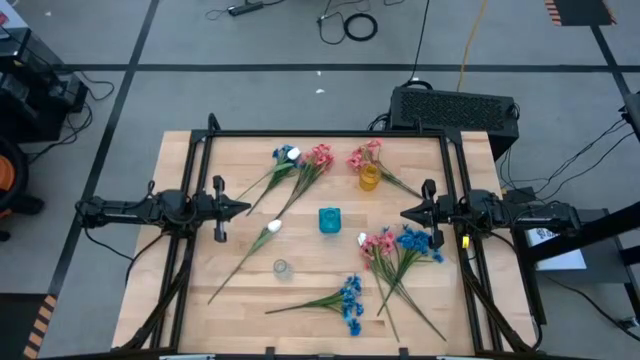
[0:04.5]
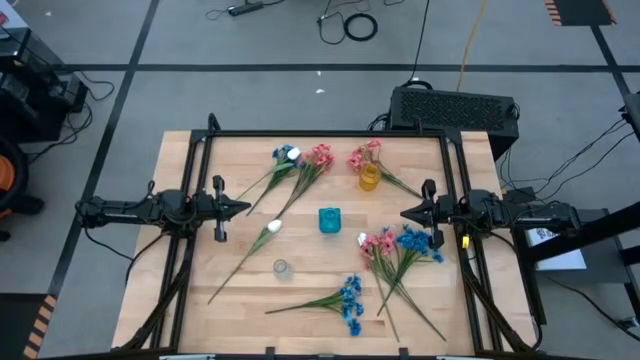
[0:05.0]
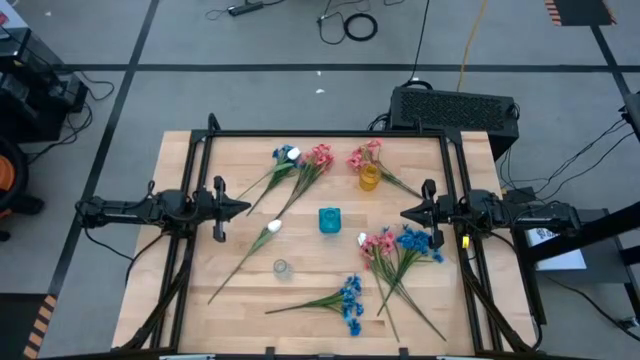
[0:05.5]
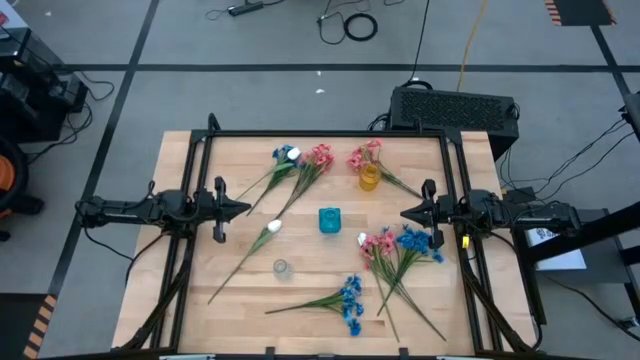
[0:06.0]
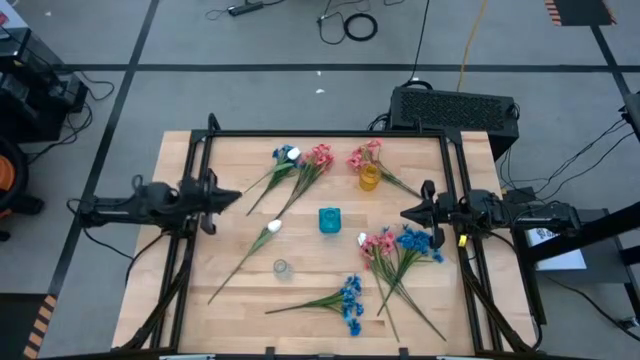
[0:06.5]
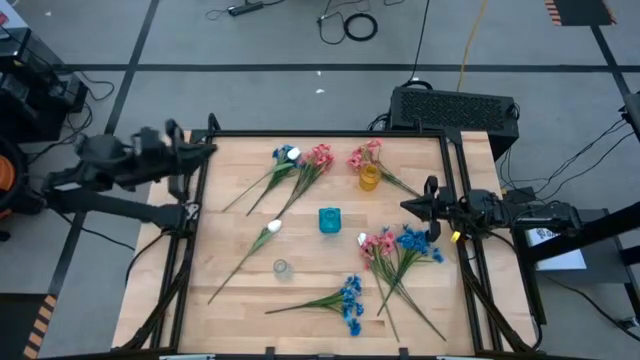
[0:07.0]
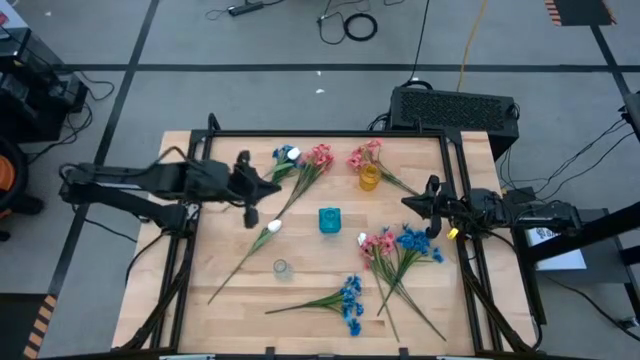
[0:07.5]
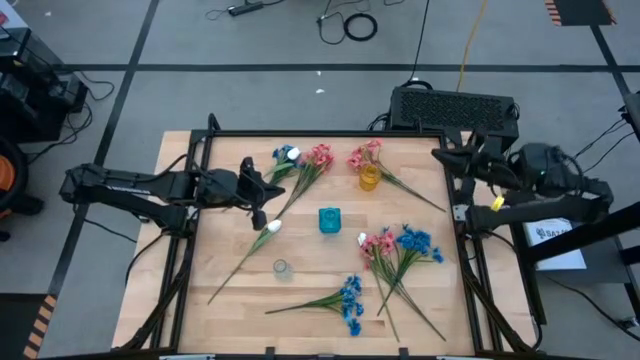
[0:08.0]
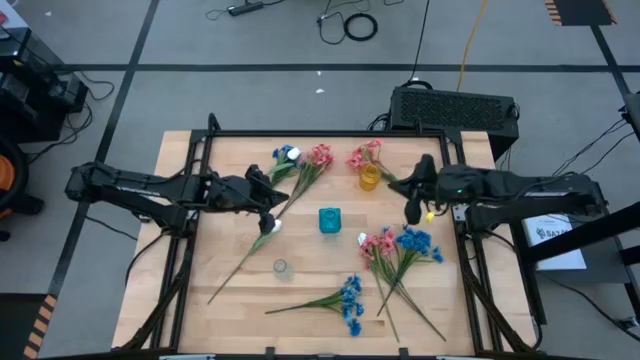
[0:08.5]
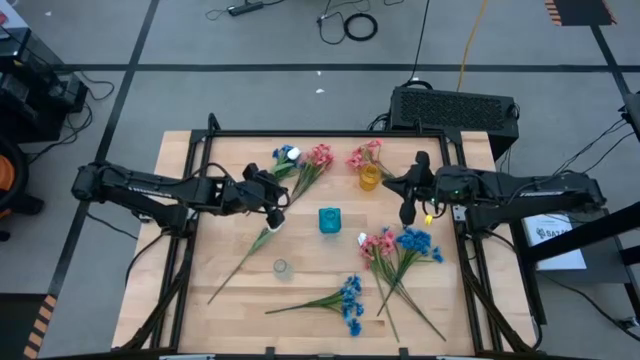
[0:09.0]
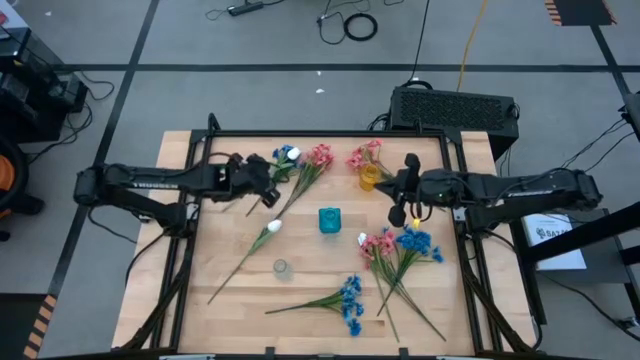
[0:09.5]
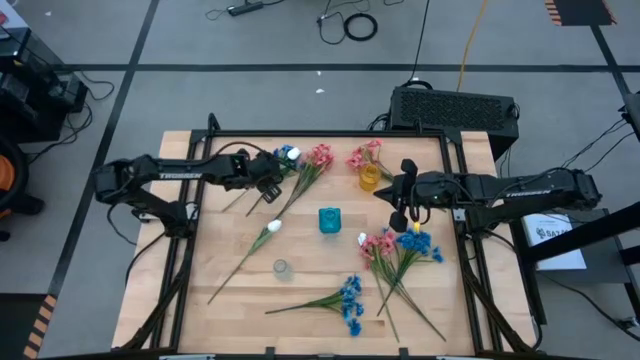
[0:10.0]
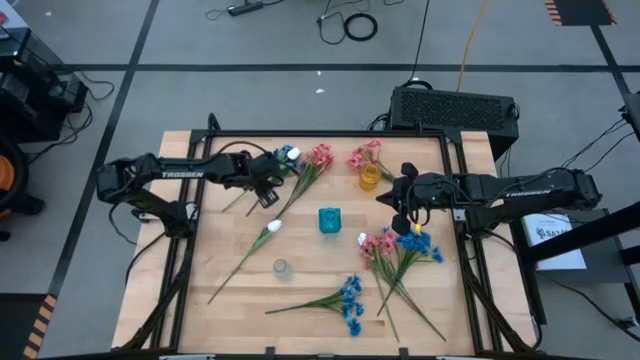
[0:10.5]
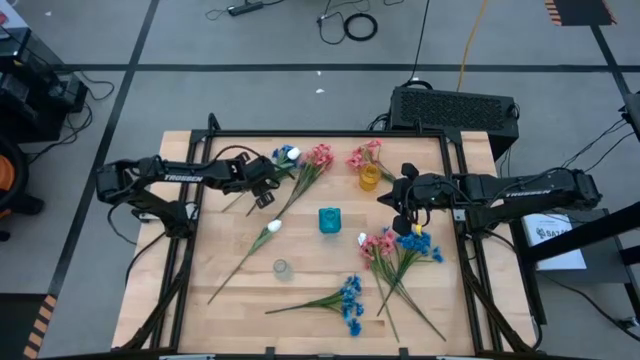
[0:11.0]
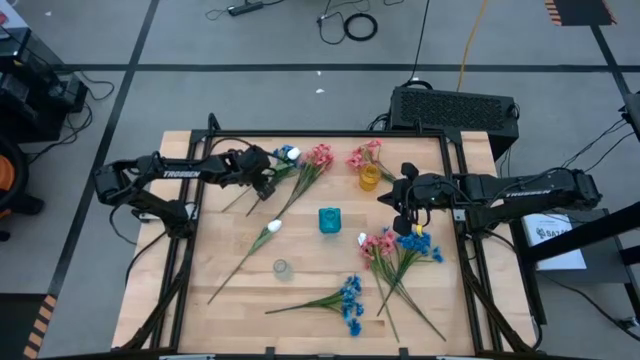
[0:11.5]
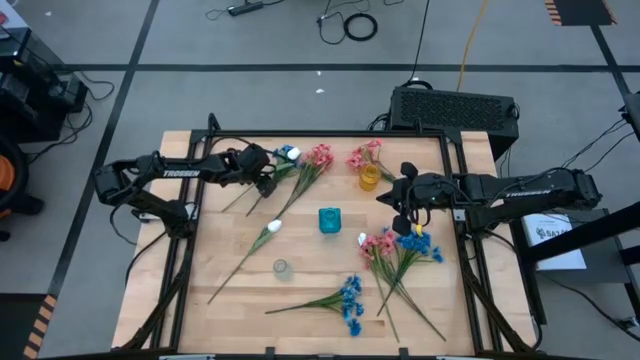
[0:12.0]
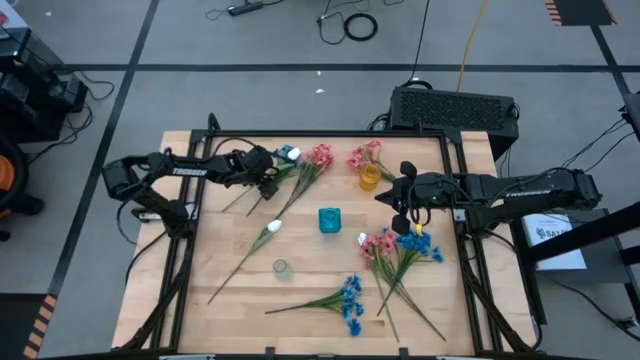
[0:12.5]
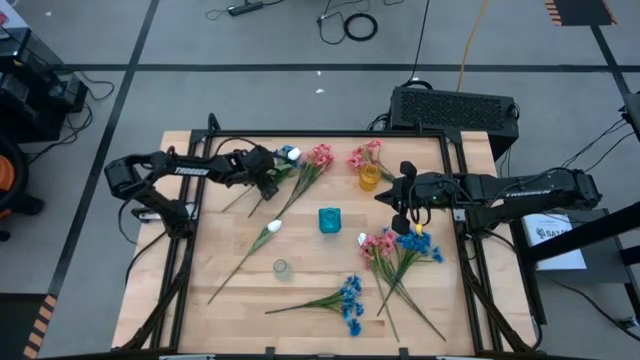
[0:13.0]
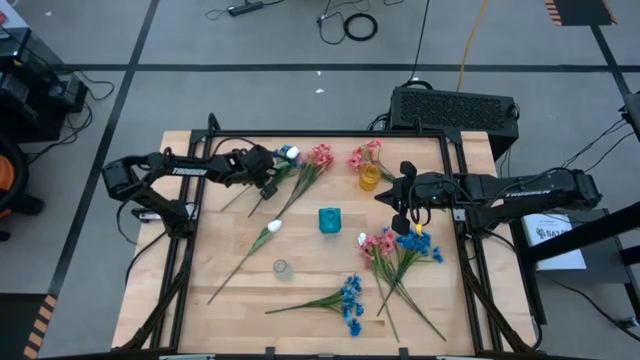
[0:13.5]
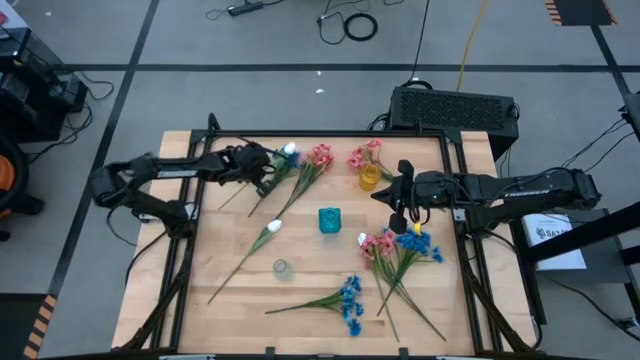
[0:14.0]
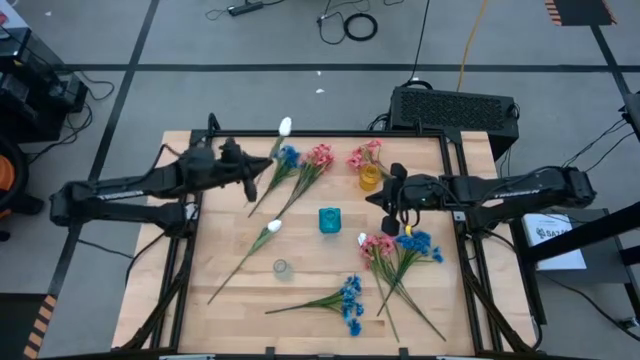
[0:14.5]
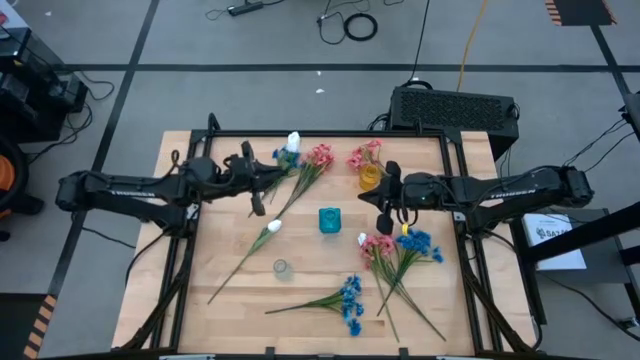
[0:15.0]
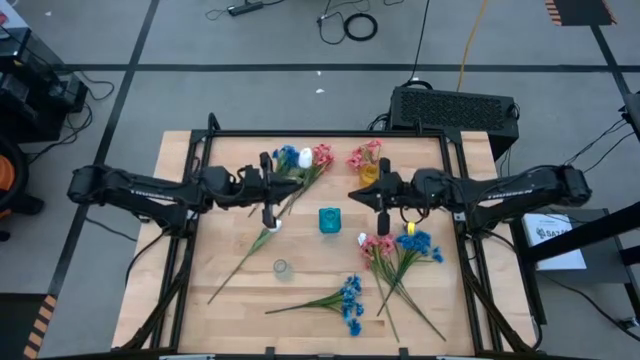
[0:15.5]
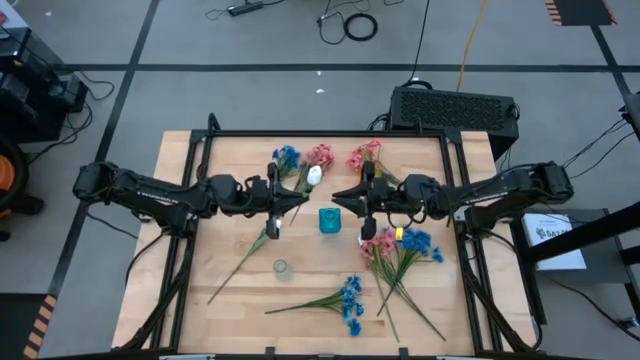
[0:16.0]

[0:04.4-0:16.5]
Task: Sort flowers into vase by color
Put the top white tulip into the yellow vase

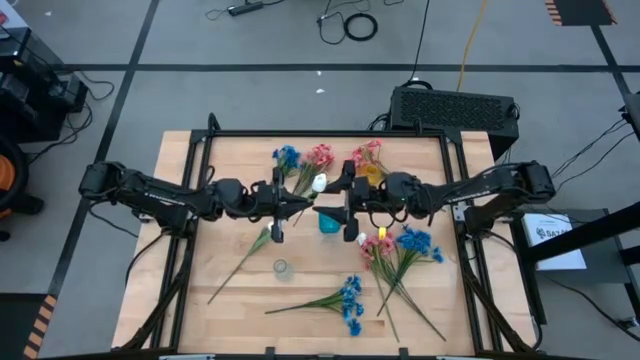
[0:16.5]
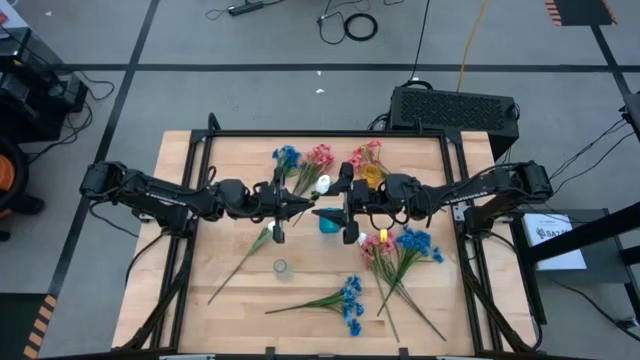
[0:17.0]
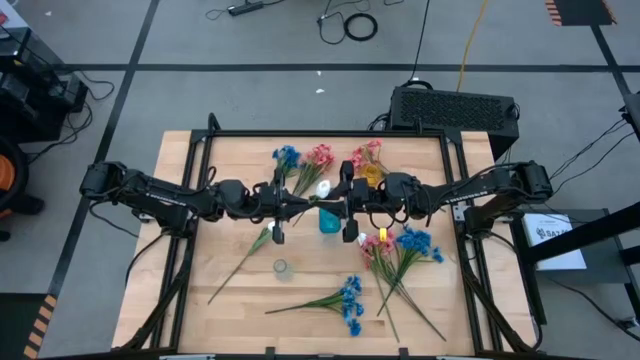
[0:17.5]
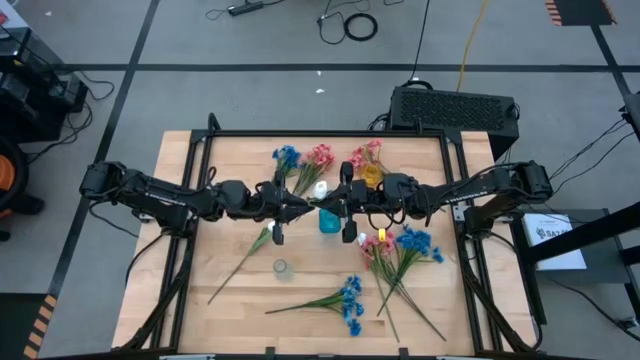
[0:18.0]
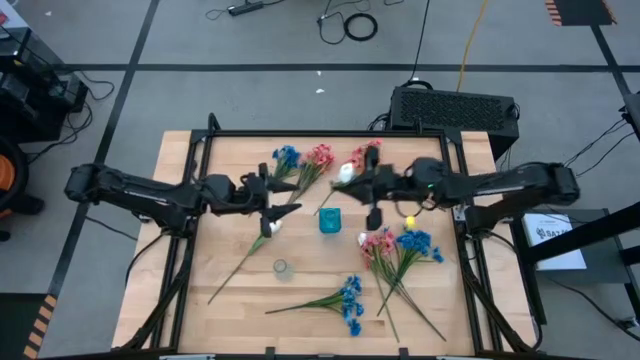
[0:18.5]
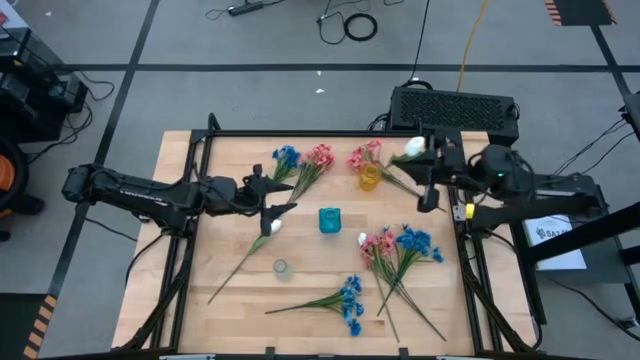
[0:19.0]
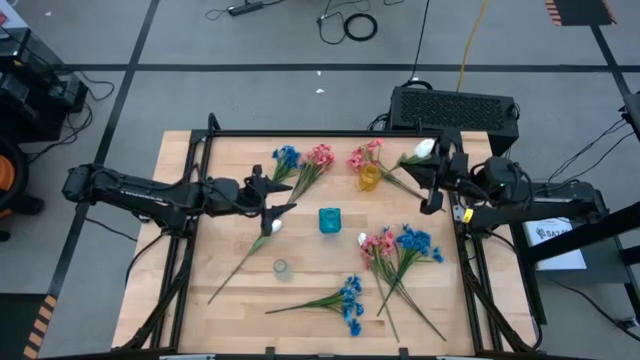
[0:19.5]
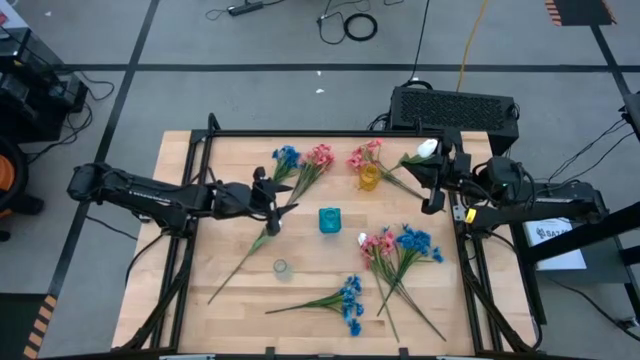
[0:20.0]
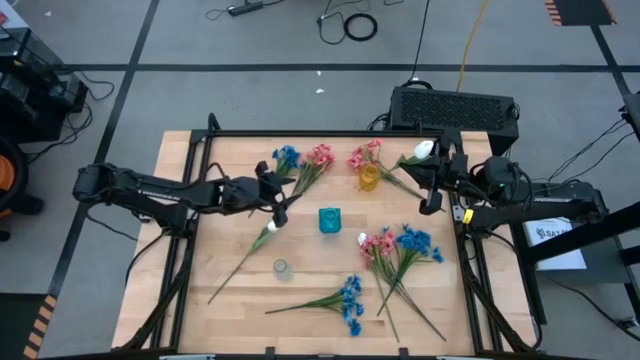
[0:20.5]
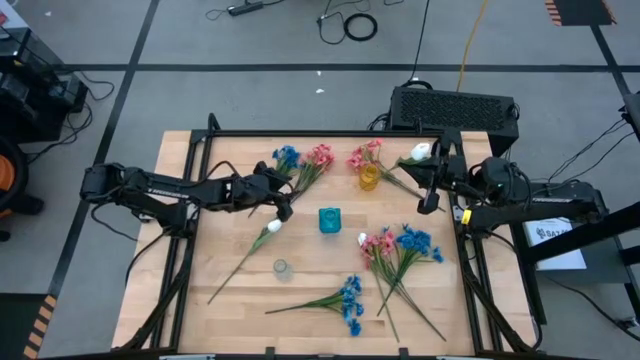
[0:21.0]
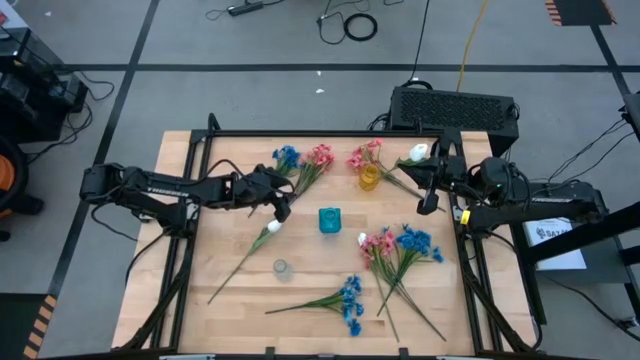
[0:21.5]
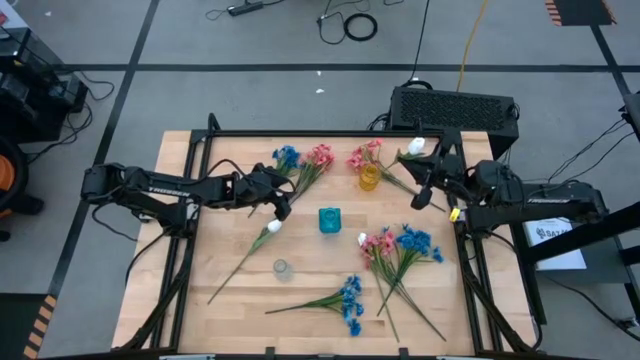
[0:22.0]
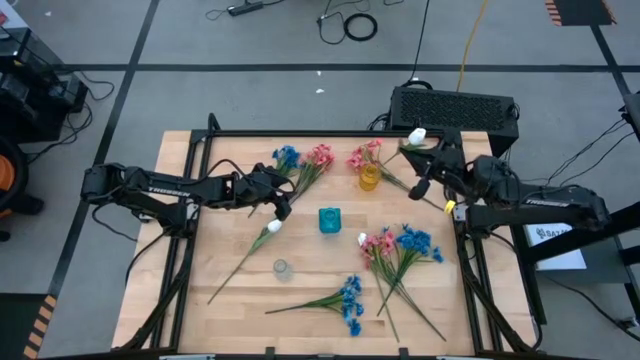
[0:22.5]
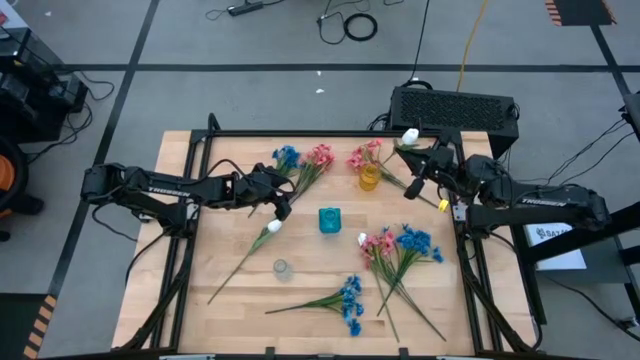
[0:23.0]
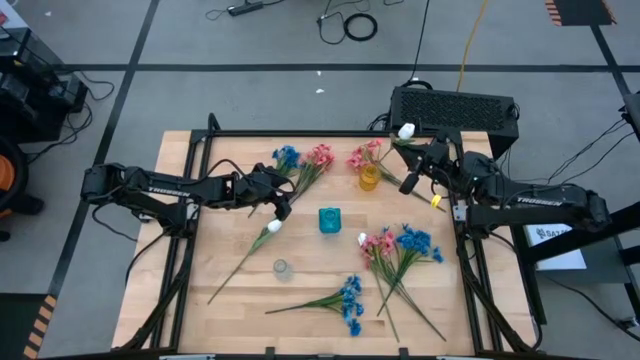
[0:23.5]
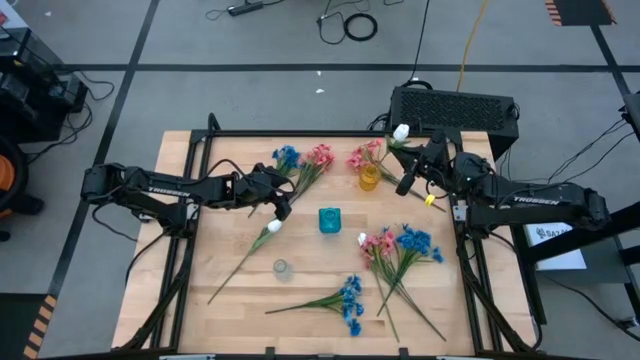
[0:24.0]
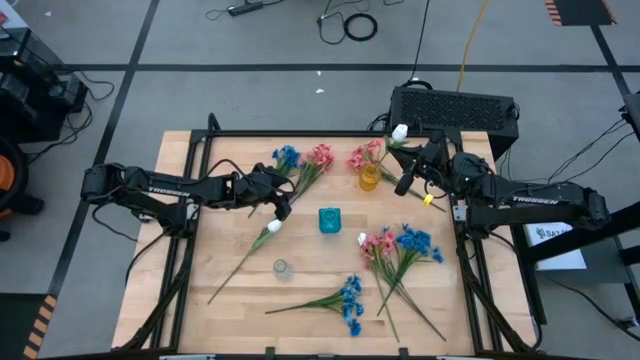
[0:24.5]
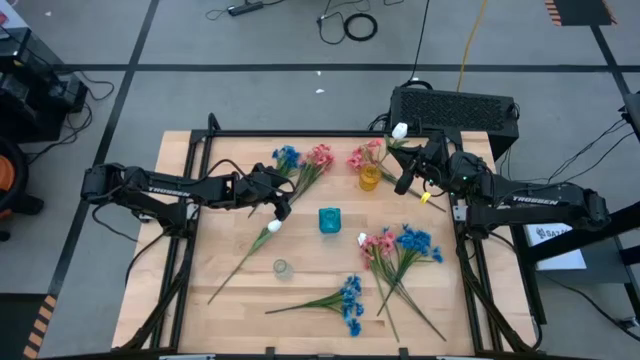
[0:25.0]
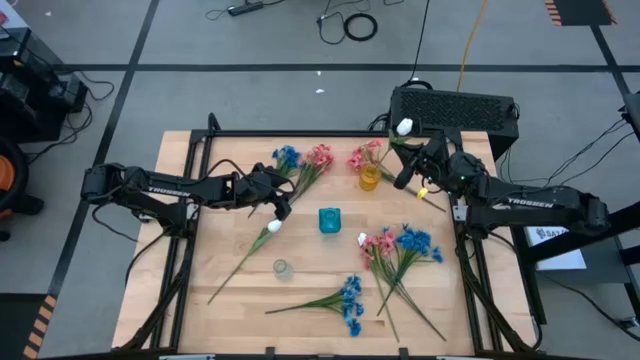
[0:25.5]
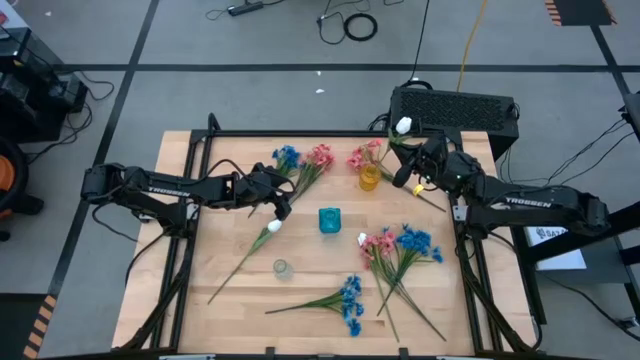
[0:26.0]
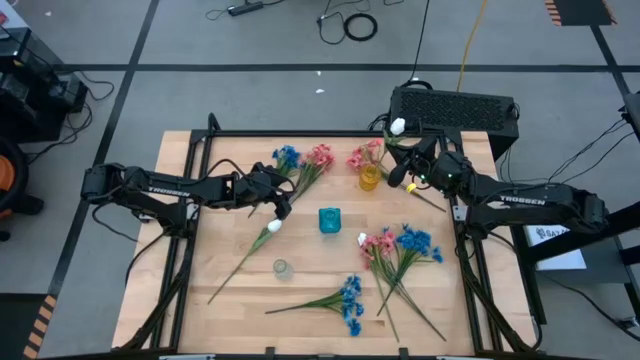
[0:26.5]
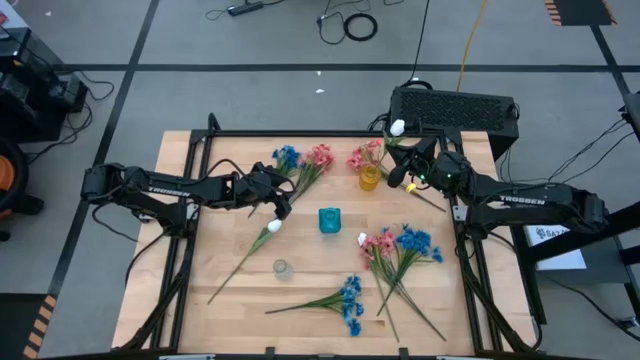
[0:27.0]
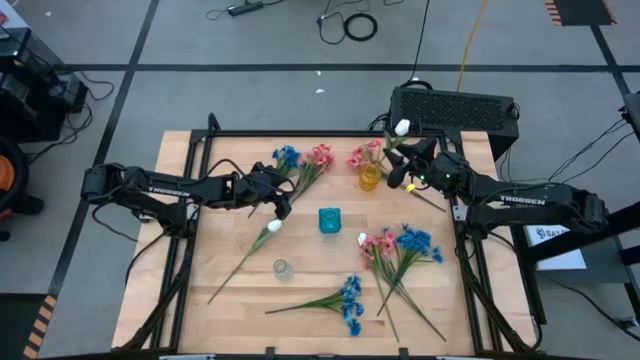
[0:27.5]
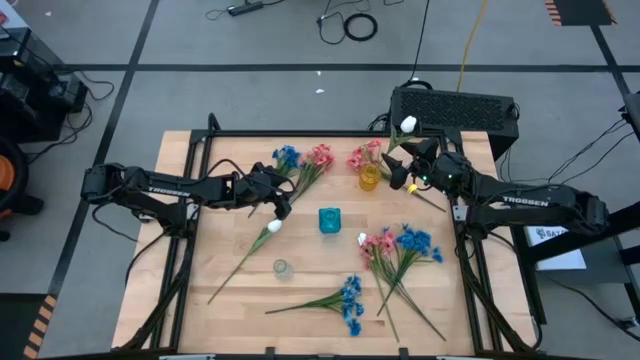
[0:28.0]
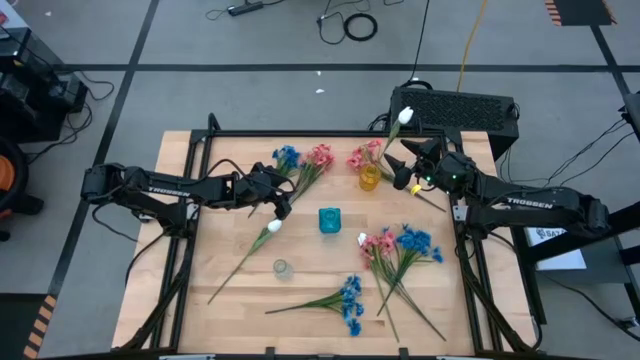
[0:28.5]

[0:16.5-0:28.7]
Put the top white tulip into the yellow vase
